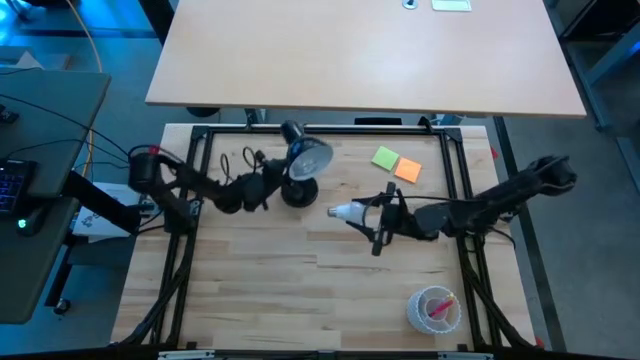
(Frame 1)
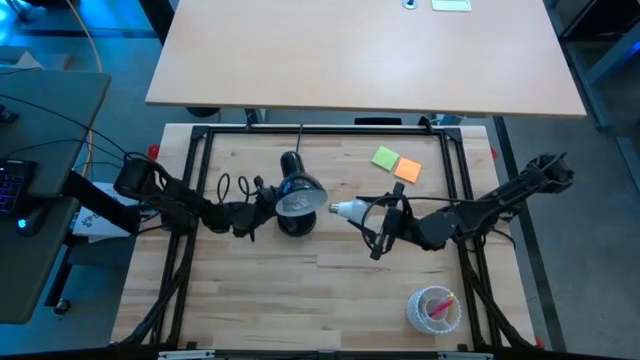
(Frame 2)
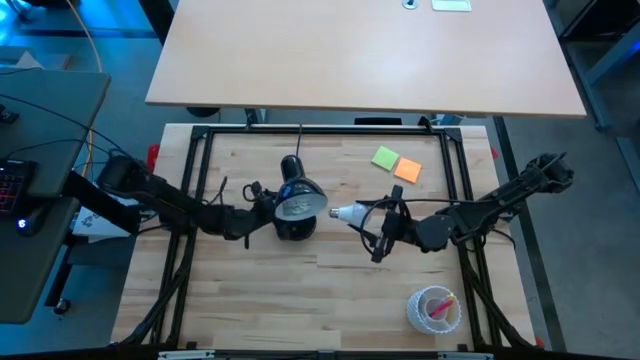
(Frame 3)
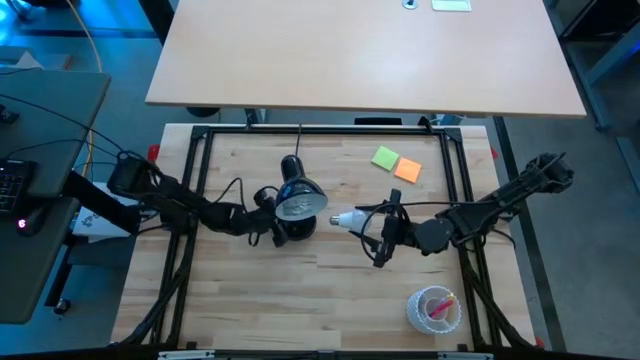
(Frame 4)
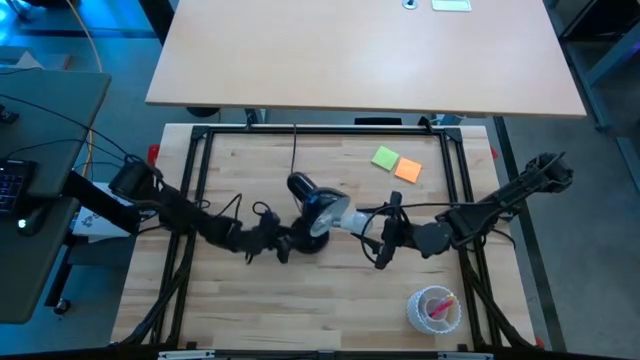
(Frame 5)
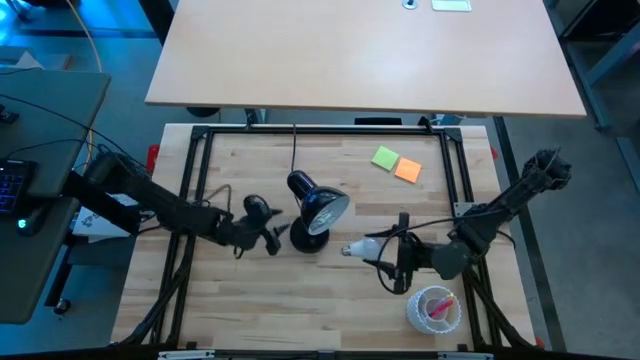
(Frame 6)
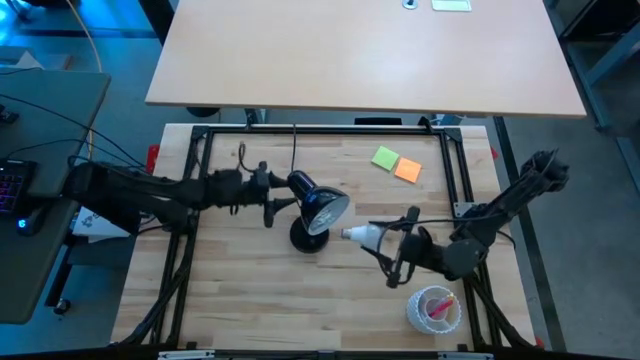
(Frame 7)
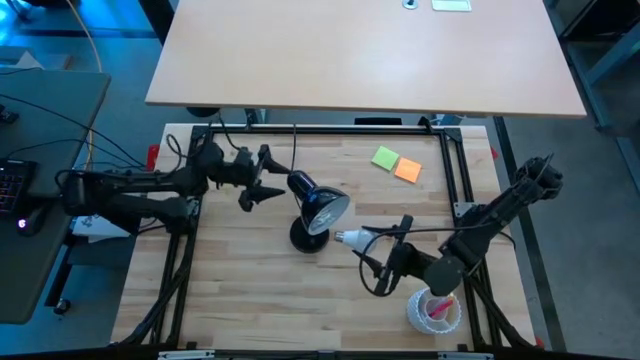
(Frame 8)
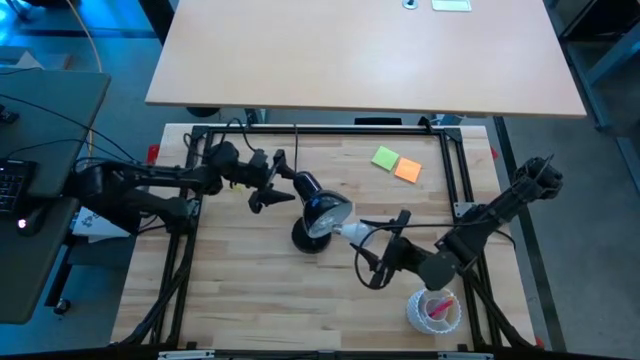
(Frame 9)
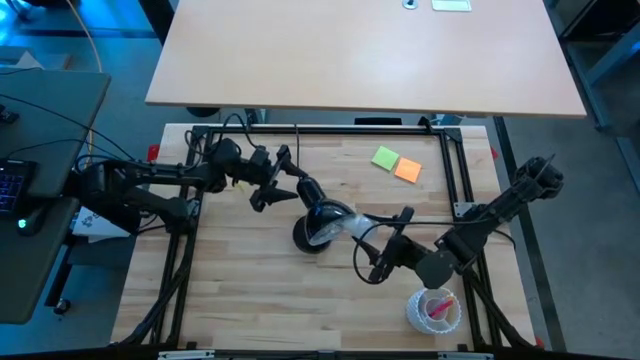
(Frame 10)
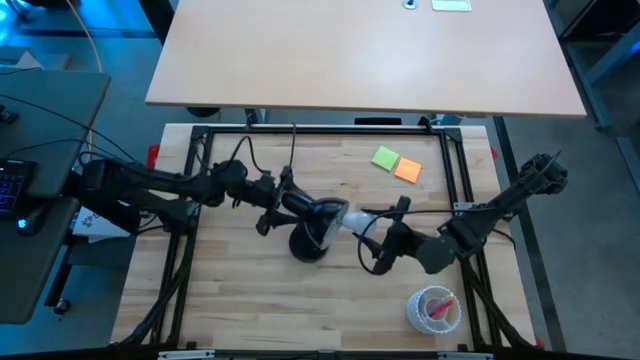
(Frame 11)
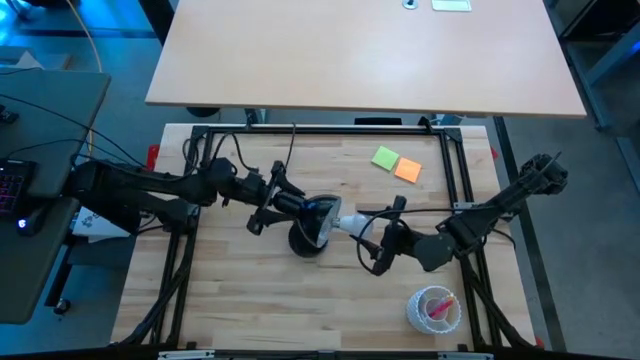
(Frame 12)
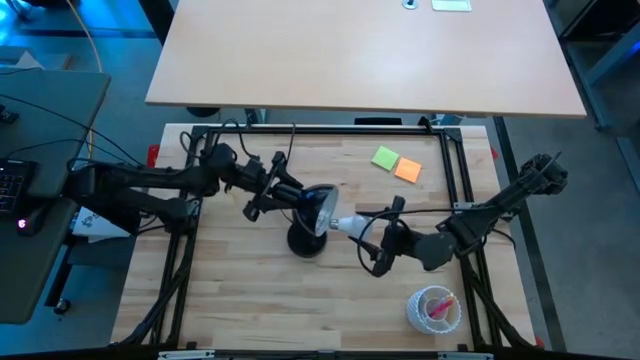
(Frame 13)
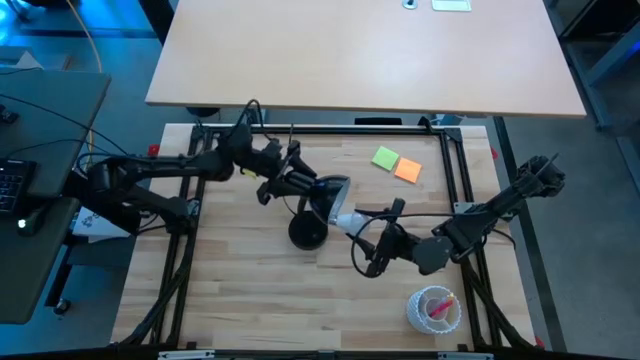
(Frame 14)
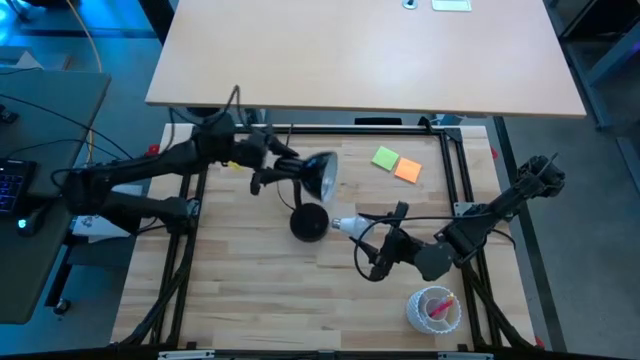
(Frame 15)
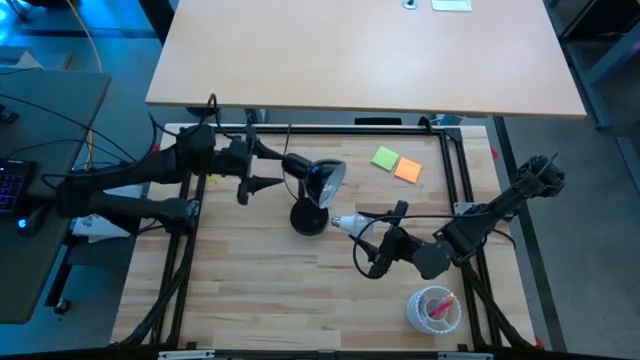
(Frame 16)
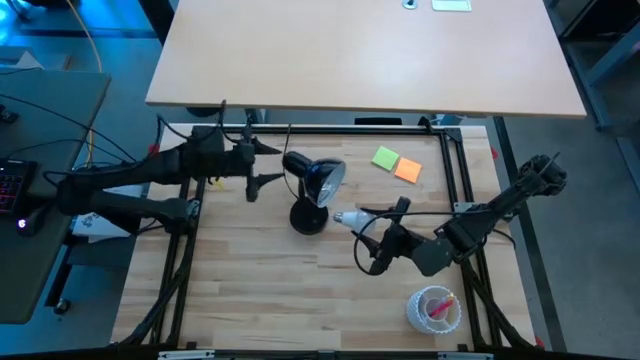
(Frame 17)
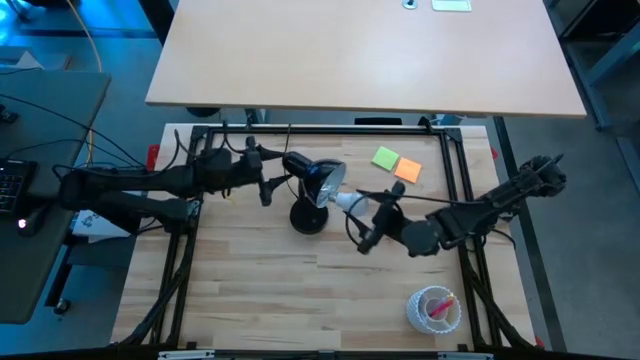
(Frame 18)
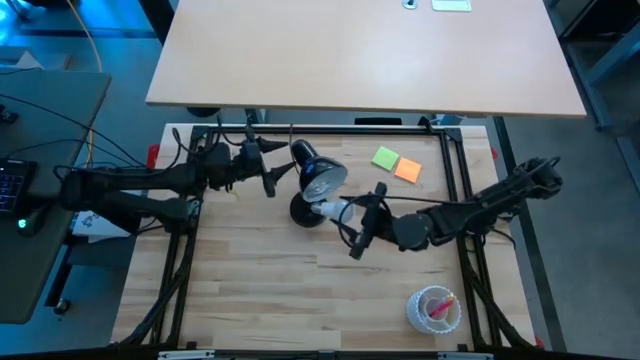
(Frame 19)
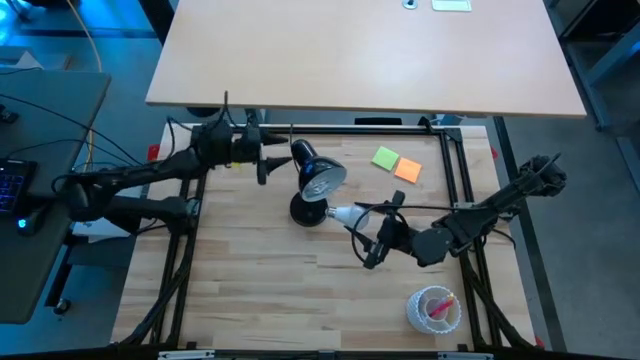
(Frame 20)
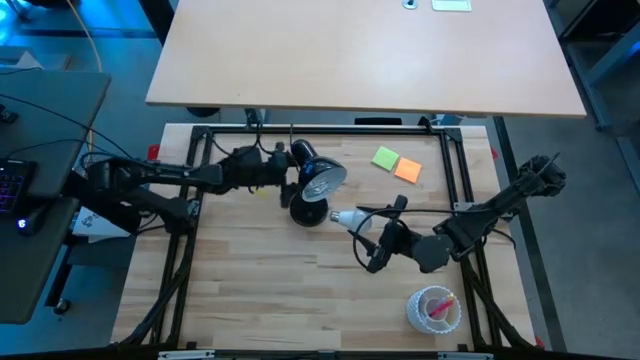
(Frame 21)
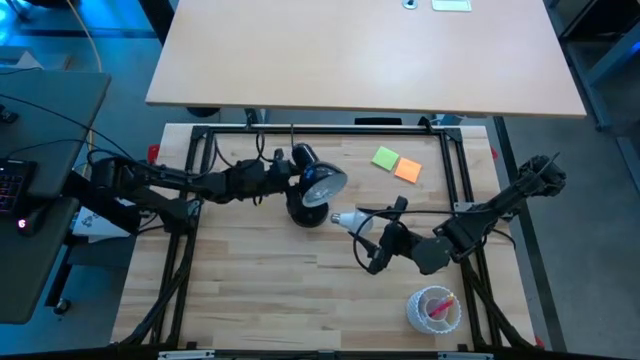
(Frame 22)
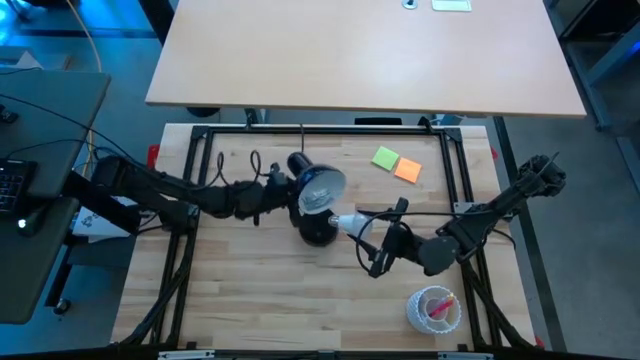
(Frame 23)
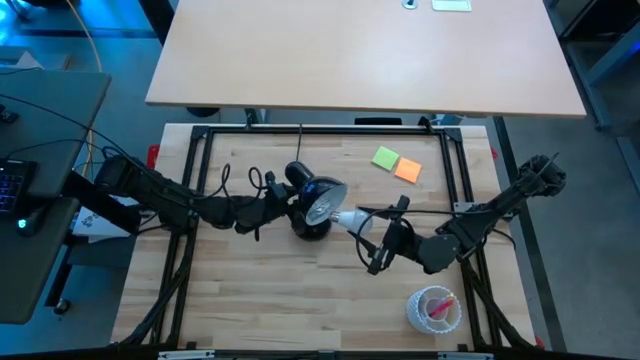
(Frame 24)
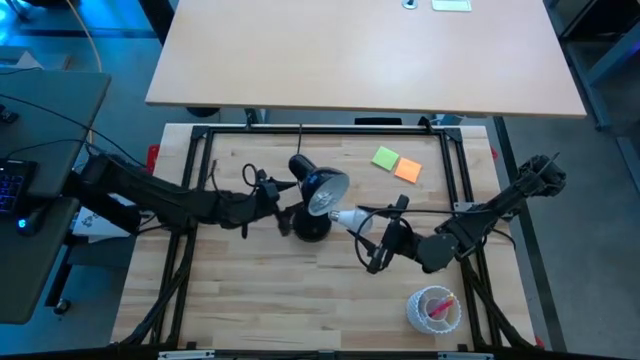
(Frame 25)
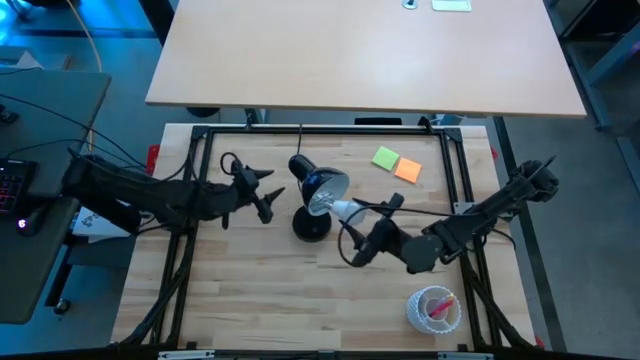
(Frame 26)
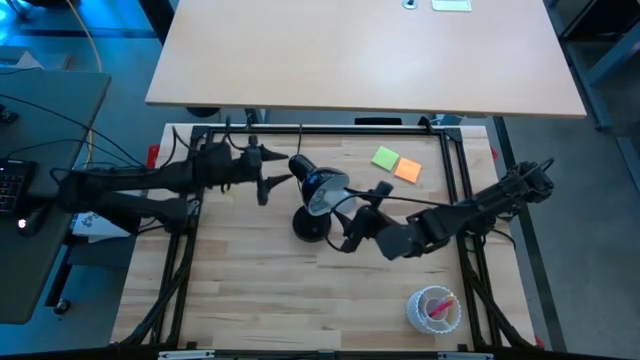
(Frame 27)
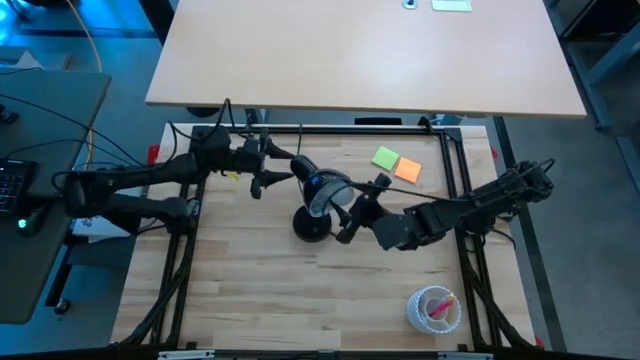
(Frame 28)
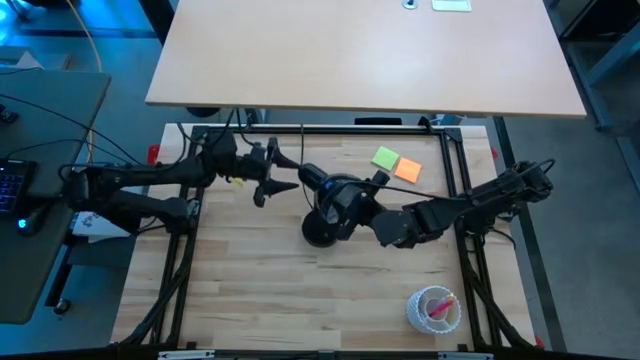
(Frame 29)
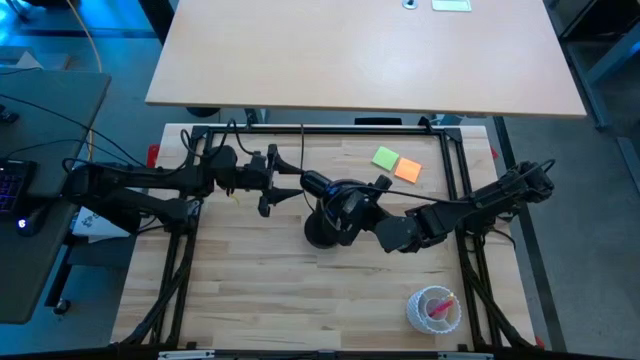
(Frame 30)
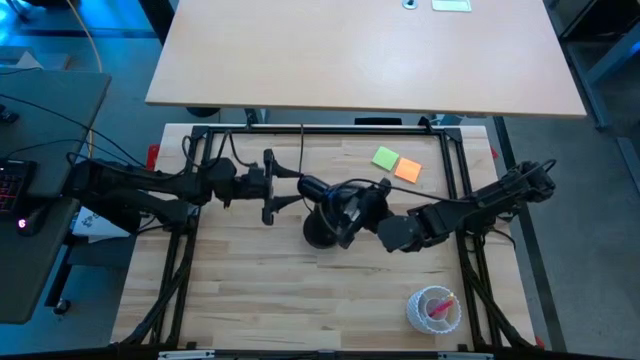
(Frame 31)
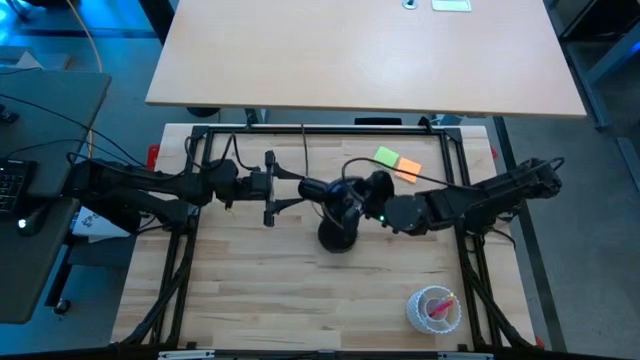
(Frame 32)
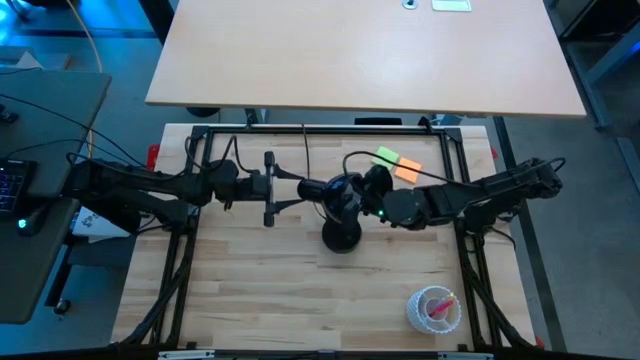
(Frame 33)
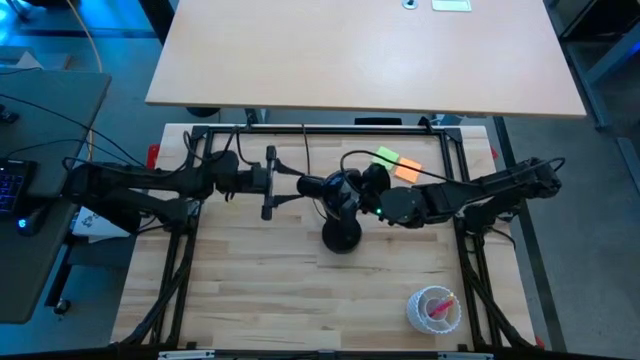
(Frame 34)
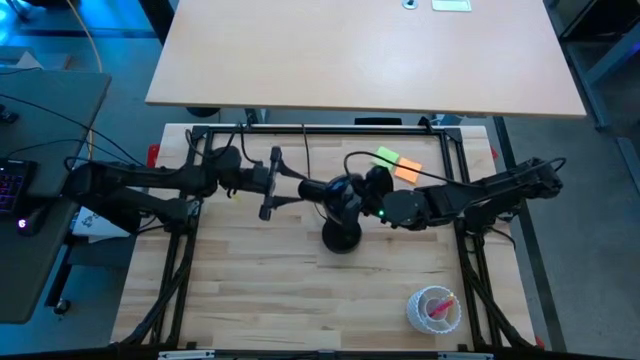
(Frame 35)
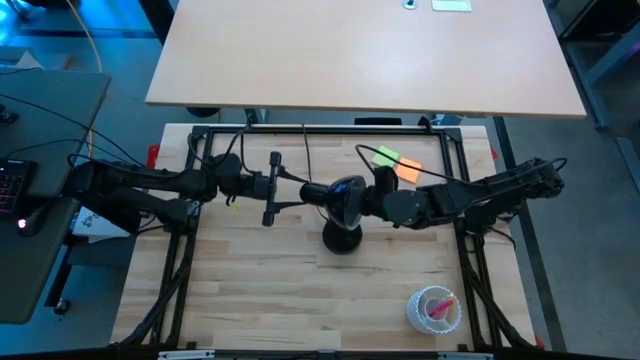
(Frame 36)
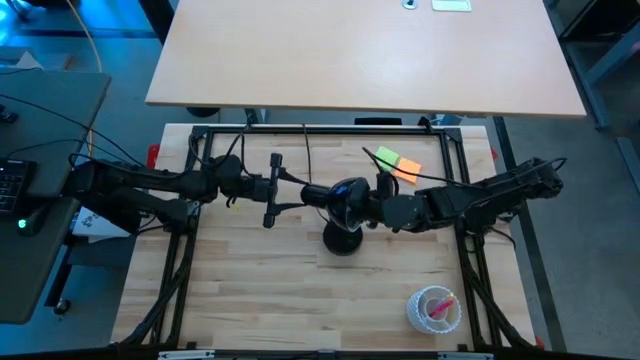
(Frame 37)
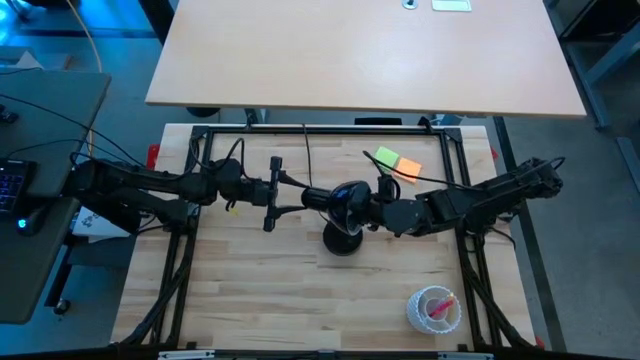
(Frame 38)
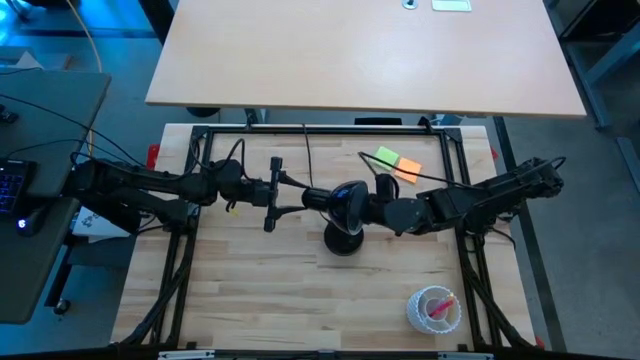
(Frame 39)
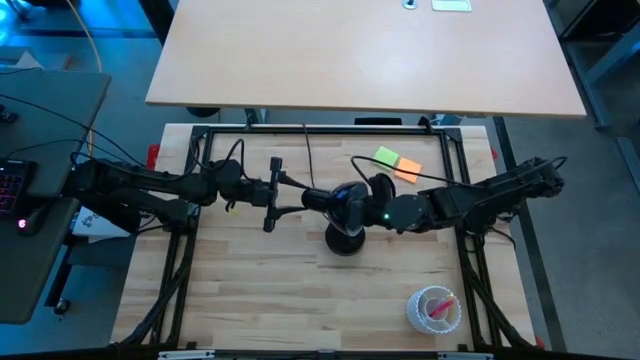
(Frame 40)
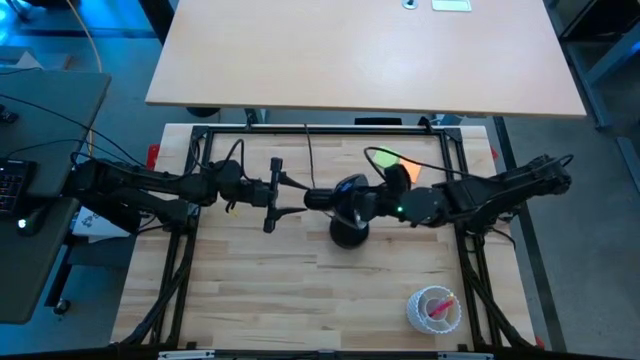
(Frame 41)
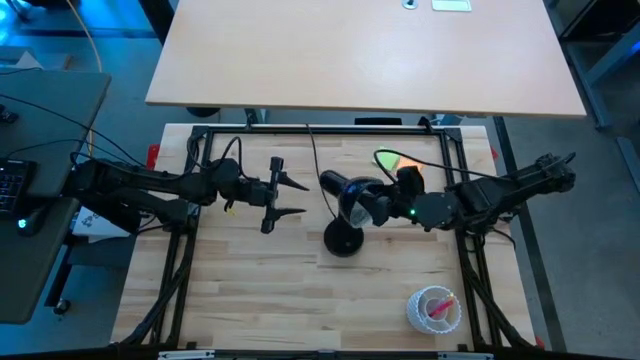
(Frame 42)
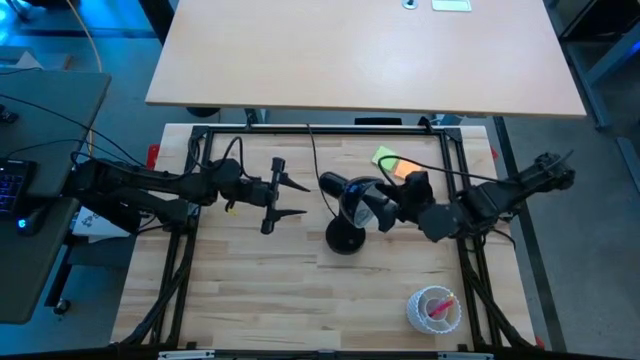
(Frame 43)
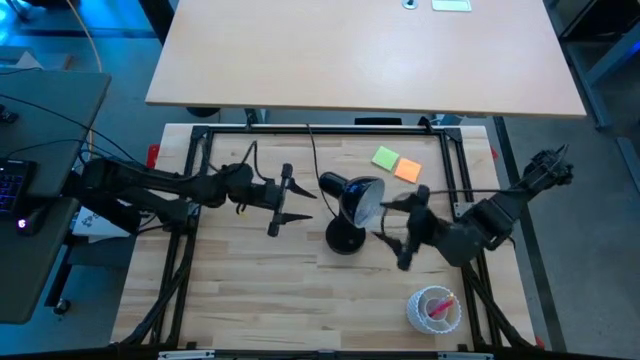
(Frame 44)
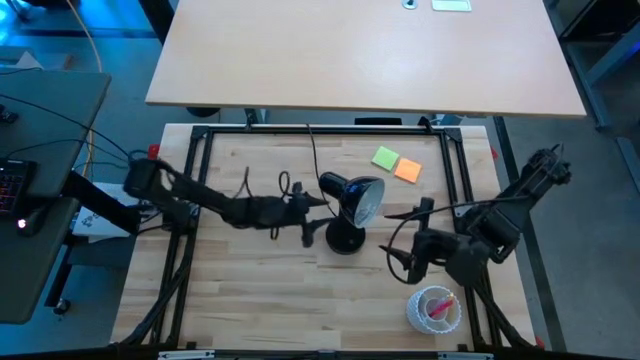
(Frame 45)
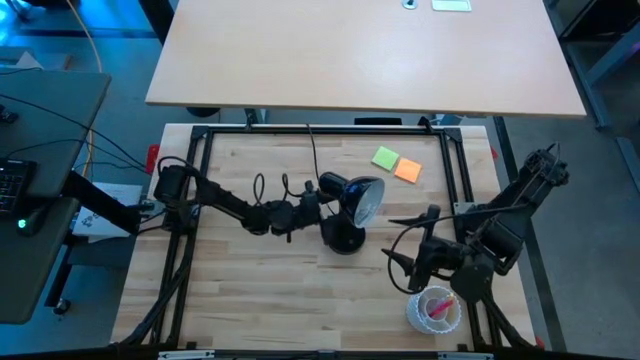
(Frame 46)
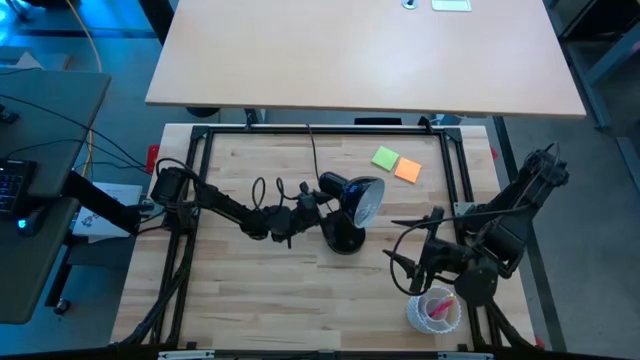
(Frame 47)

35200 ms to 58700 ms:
Task: Screw lightbulb
Insert the white lightbulb into the black lamp
